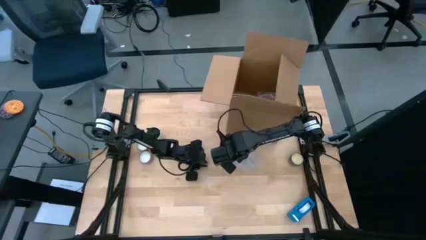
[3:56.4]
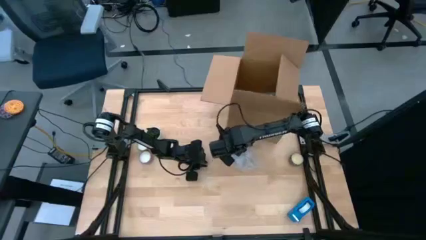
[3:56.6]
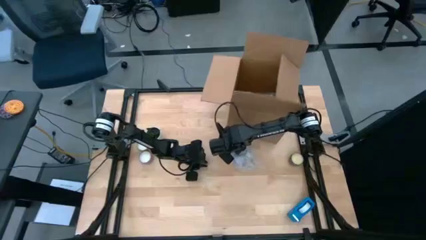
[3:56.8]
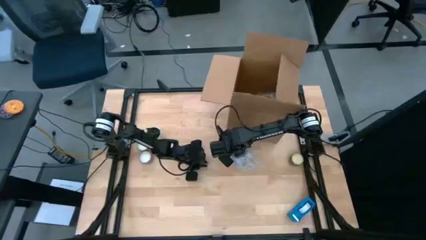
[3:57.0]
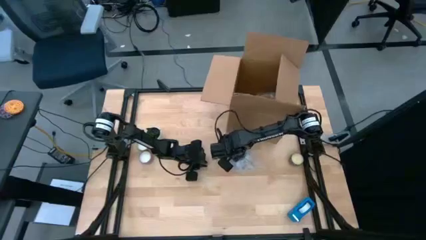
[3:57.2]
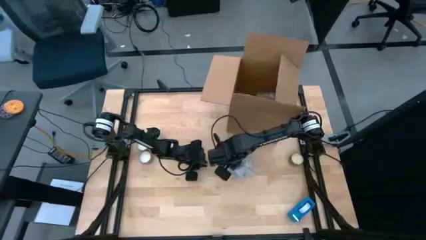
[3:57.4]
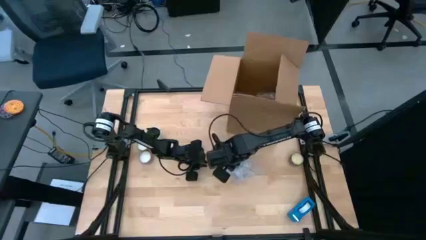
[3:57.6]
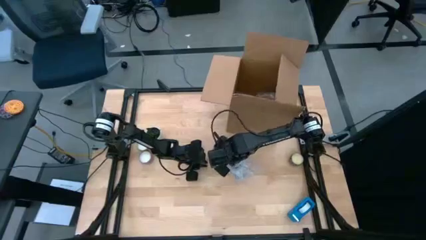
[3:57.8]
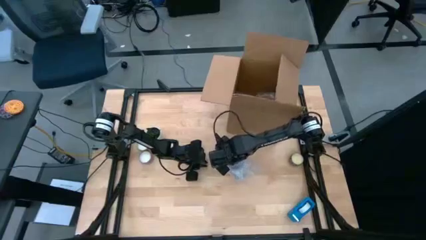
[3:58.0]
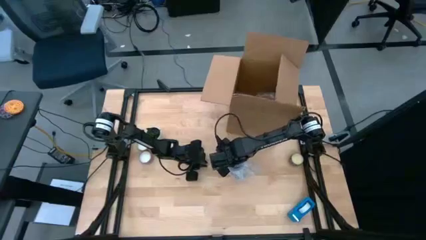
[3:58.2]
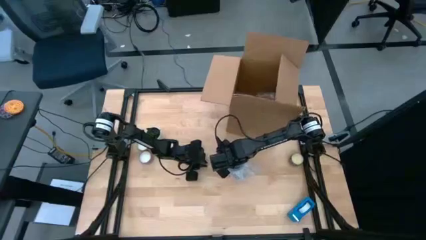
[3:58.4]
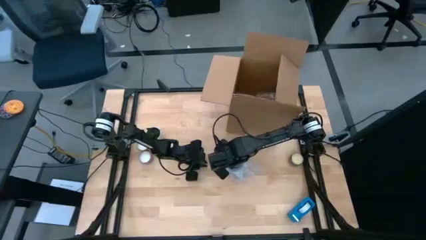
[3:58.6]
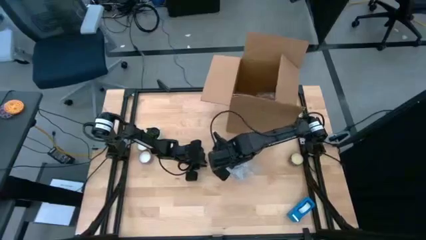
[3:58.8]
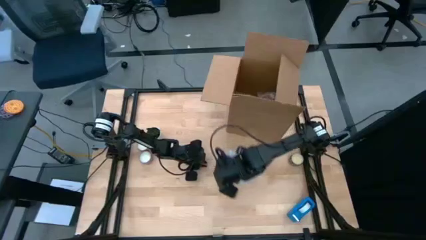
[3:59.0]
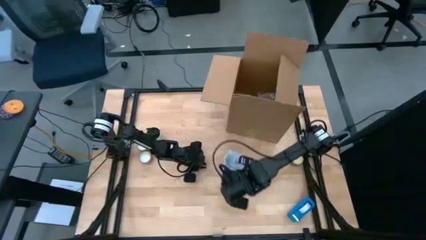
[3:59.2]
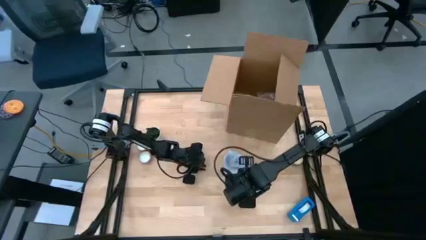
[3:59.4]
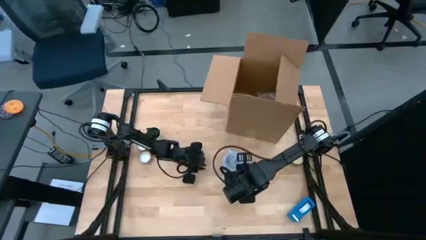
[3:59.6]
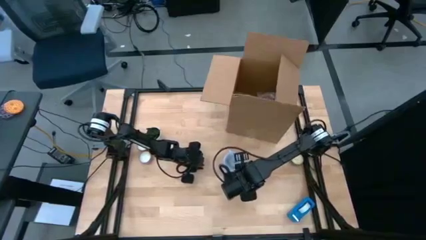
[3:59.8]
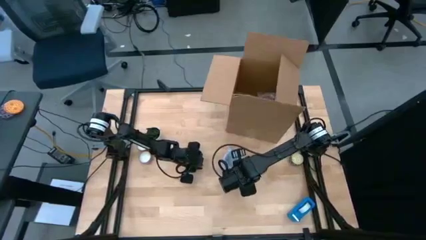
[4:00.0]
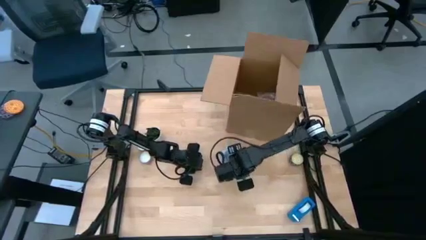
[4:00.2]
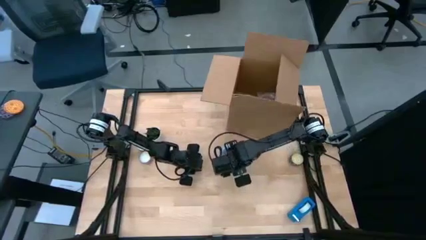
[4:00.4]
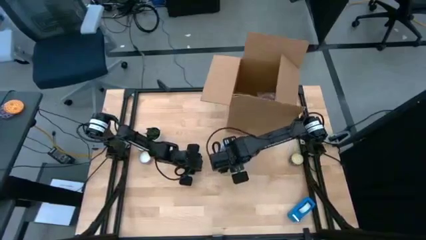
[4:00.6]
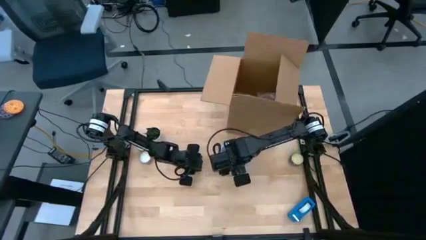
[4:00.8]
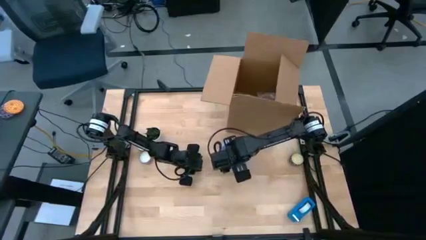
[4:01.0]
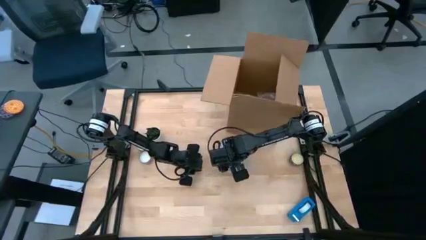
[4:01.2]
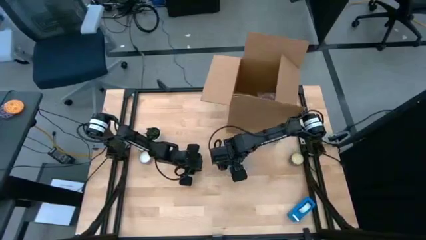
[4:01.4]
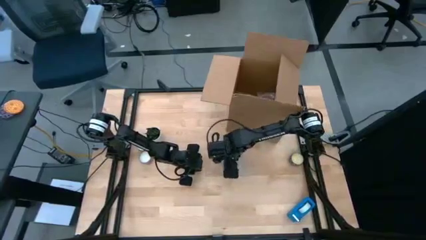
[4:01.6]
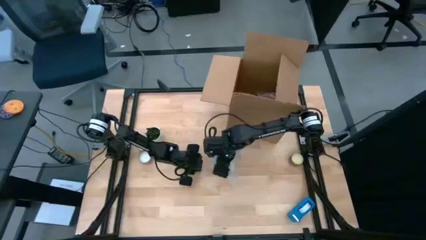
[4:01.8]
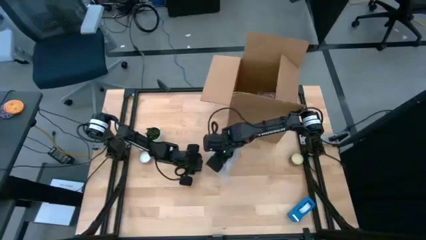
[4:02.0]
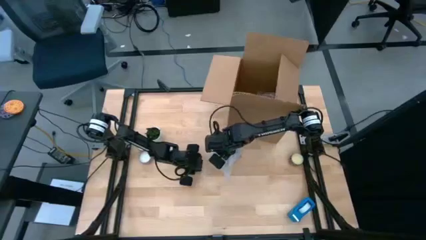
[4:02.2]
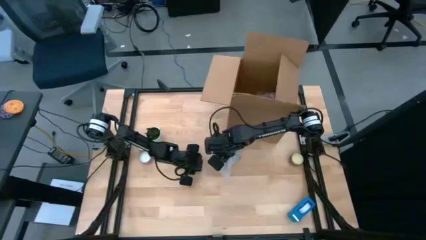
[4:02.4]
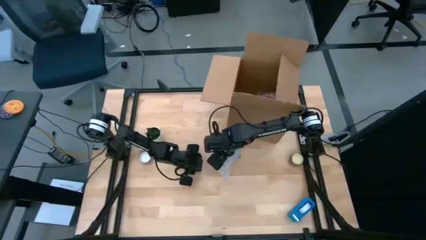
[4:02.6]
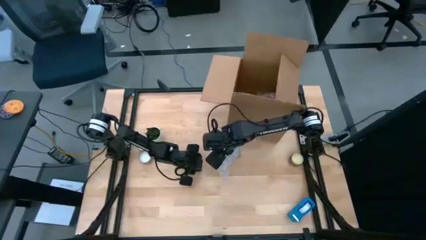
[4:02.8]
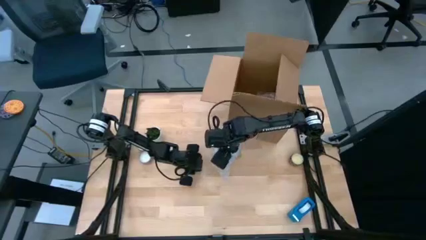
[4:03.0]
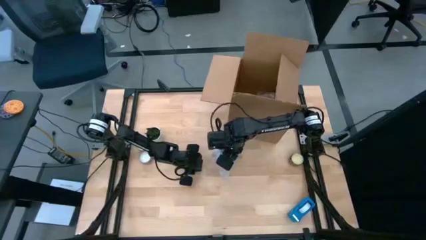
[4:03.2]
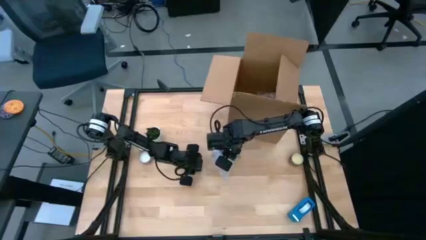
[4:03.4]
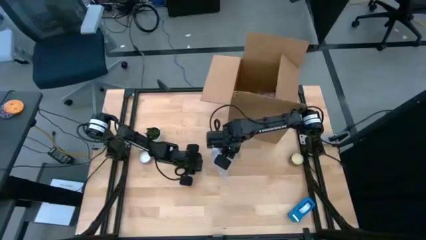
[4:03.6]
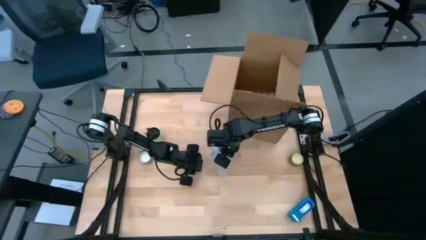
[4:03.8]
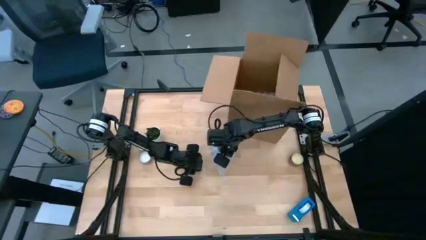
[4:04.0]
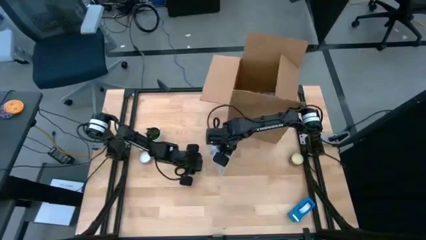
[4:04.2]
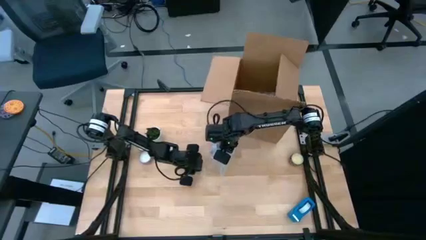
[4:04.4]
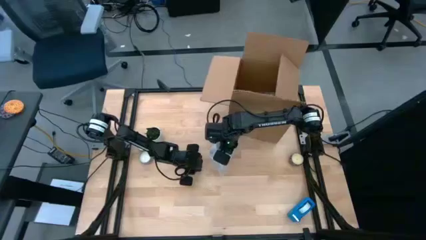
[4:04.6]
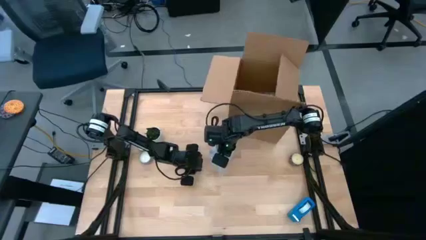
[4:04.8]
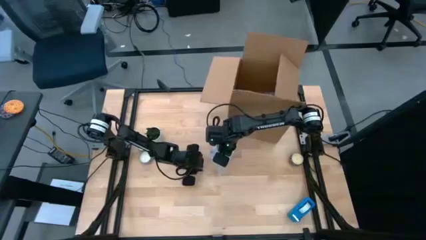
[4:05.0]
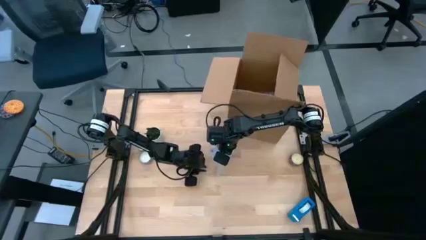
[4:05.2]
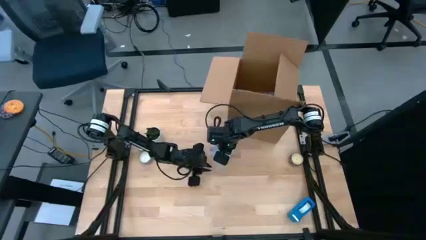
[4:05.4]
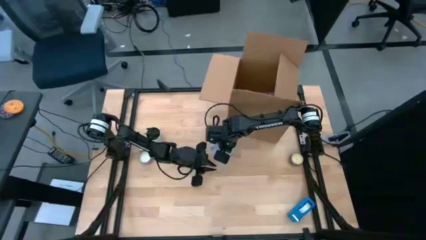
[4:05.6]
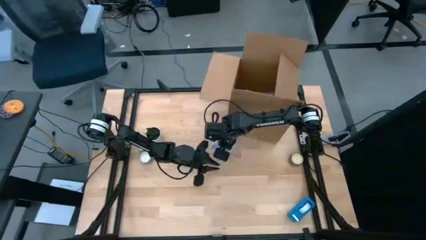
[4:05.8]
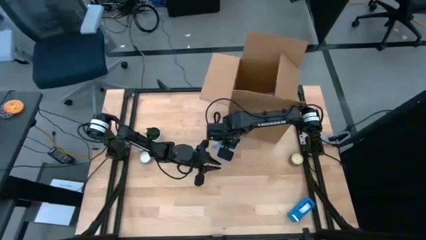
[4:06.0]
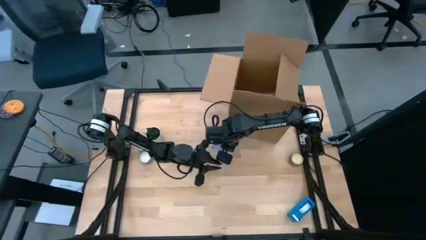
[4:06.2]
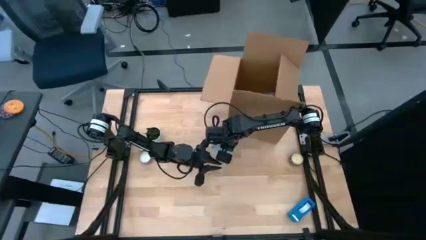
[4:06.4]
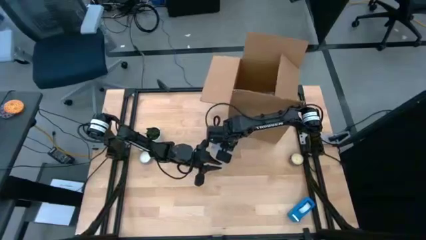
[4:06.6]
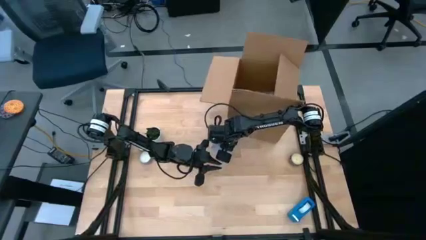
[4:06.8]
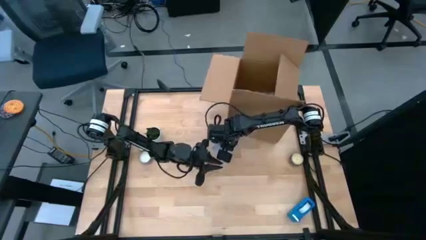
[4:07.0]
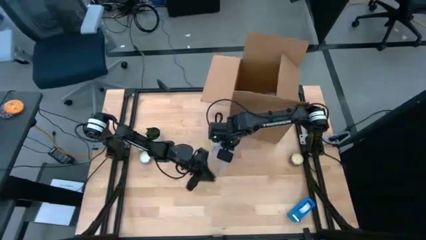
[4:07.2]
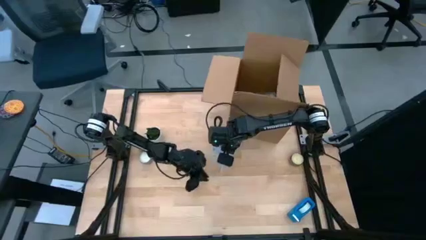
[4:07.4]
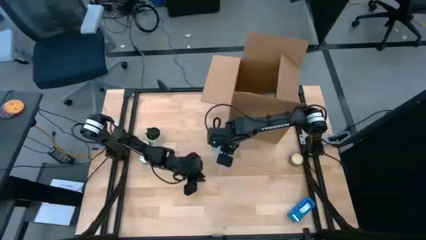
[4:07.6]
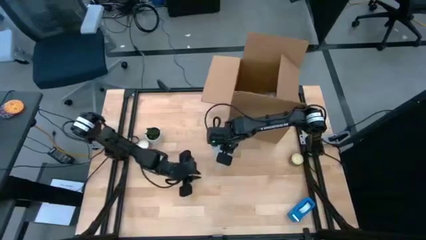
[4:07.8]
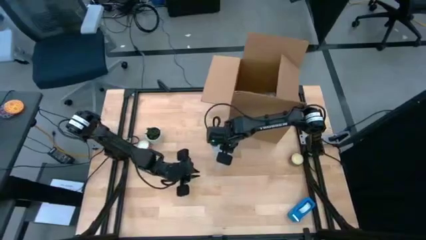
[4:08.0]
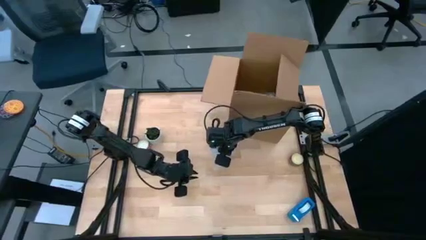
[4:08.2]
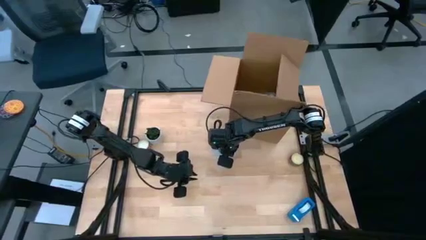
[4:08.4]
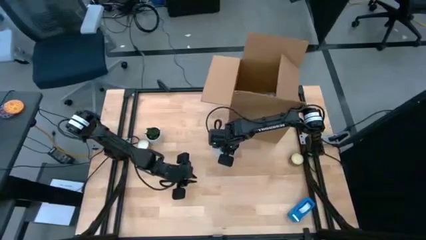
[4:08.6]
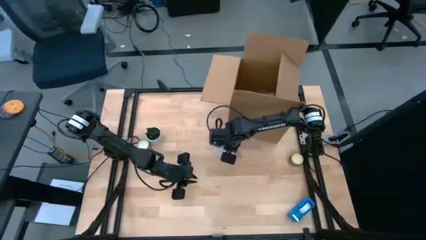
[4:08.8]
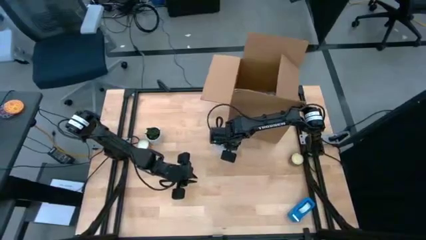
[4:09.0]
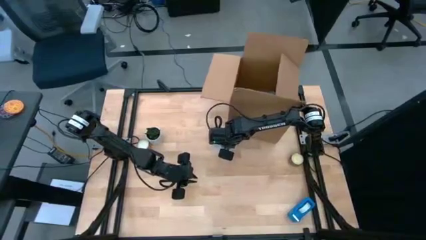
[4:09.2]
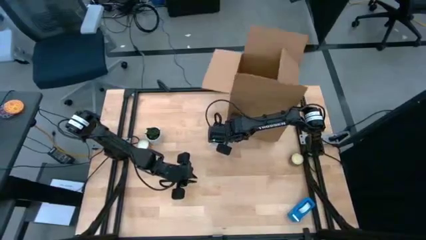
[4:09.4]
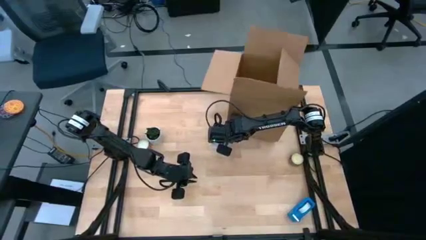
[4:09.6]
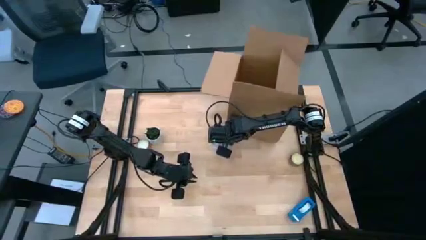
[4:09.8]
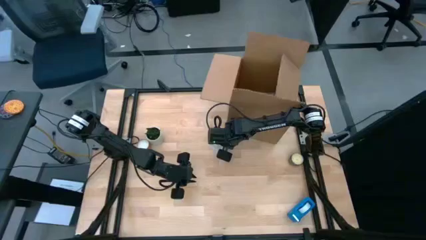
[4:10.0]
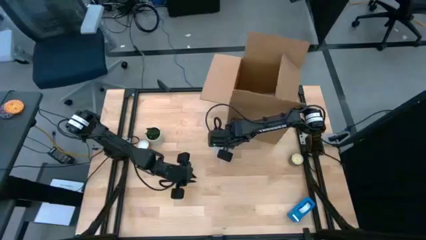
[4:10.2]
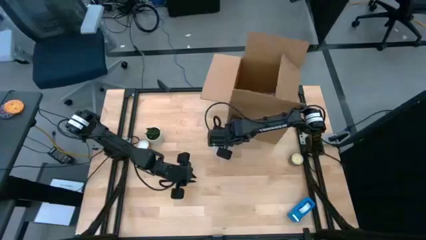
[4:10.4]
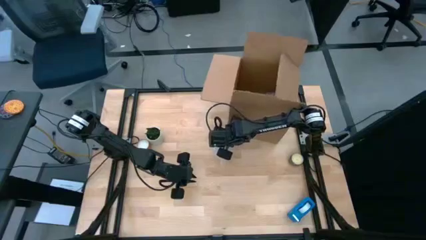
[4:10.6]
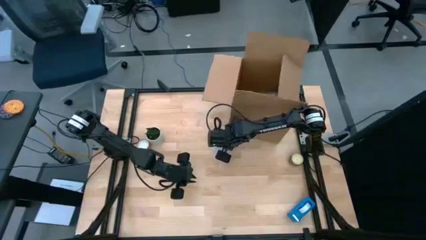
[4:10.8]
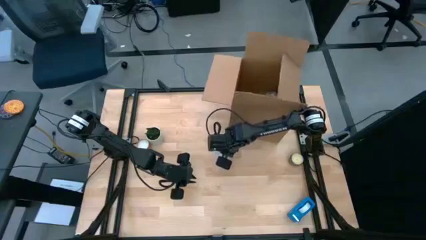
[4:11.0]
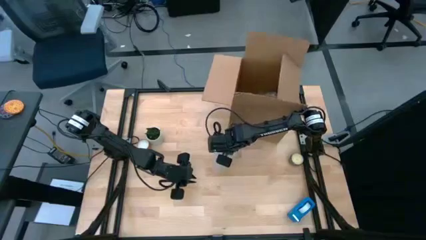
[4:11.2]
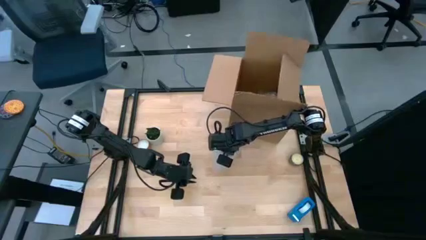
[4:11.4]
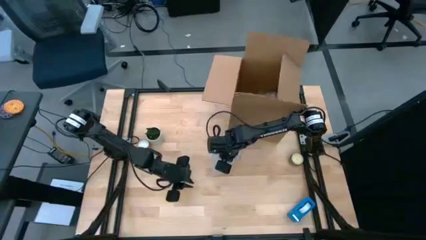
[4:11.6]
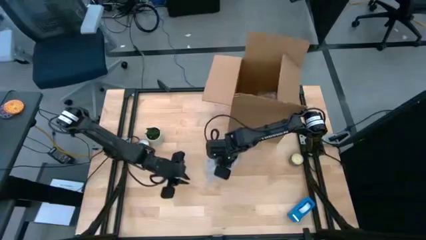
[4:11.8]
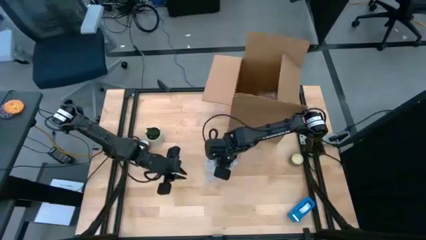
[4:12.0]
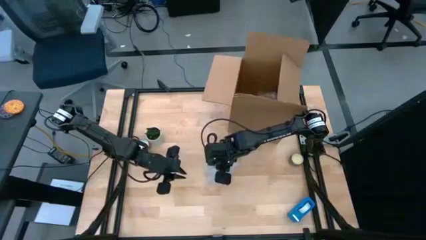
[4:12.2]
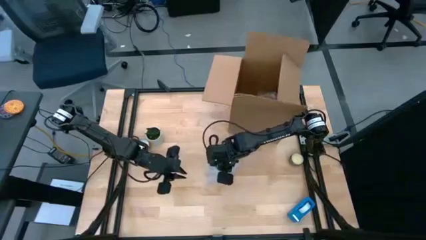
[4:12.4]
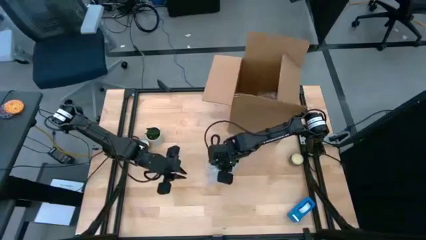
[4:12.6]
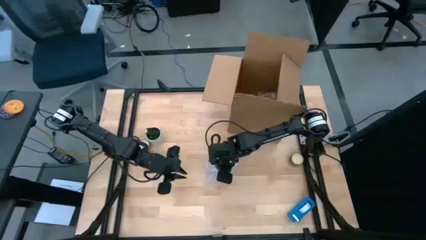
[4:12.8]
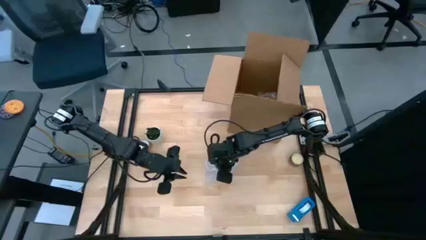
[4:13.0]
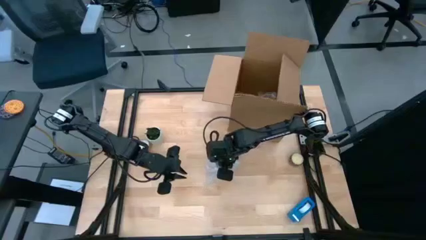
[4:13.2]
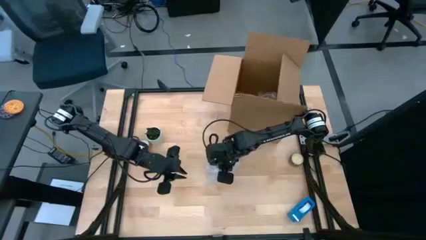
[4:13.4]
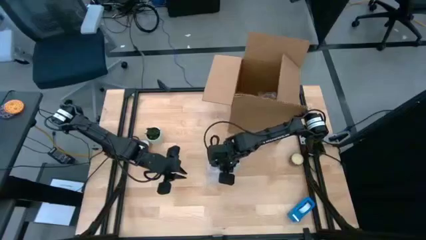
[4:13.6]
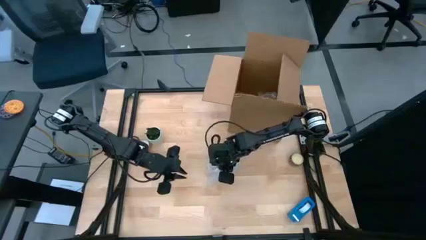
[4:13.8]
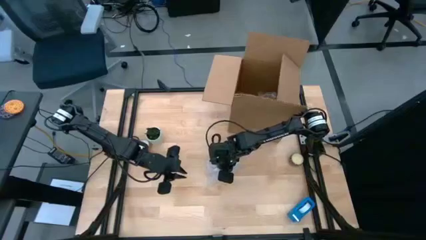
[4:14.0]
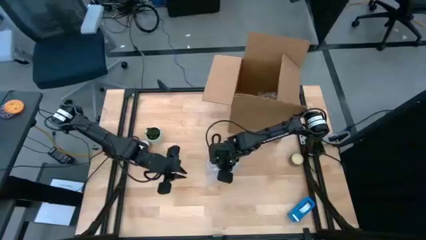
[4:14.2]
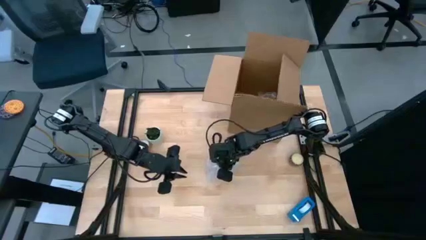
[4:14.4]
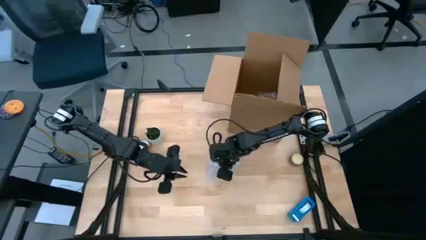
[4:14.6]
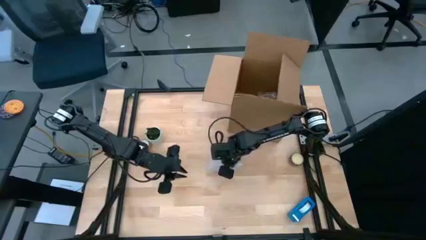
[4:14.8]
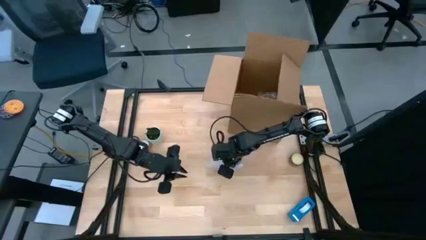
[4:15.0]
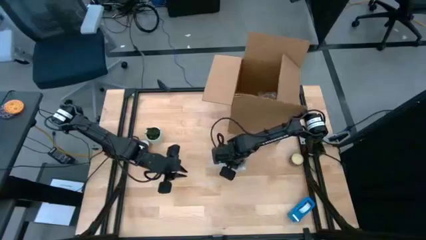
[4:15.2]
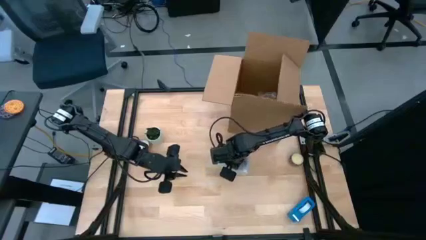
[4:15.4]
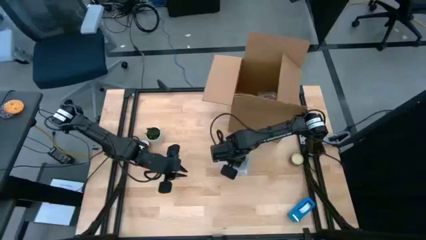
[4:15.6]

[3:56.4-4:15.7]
Task: wrap mug
Wrap the purple mug with the bubble wrap
